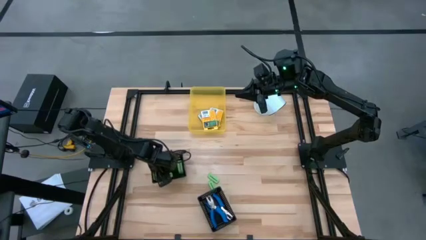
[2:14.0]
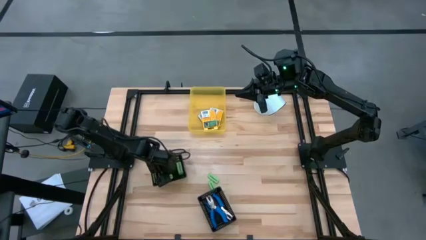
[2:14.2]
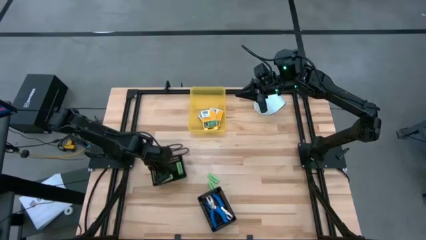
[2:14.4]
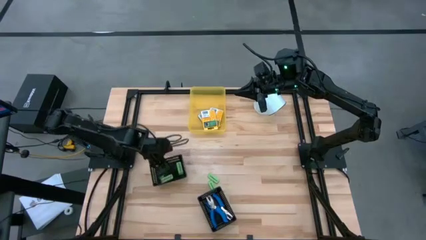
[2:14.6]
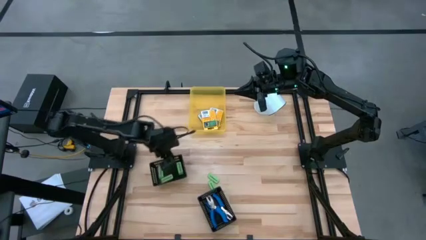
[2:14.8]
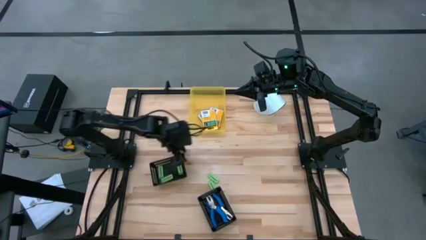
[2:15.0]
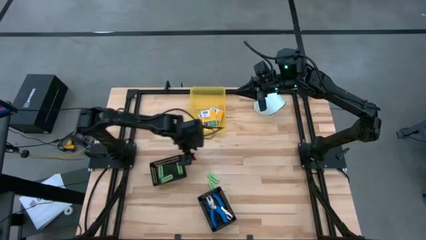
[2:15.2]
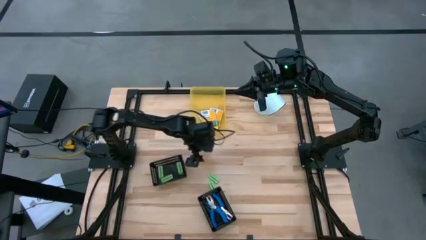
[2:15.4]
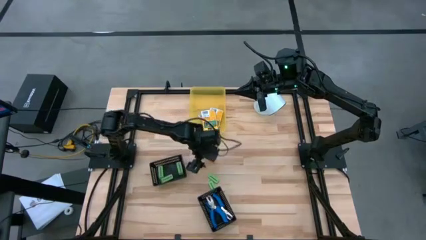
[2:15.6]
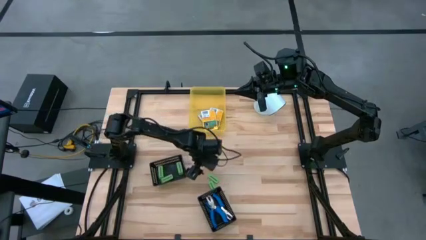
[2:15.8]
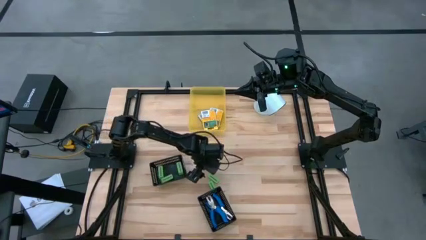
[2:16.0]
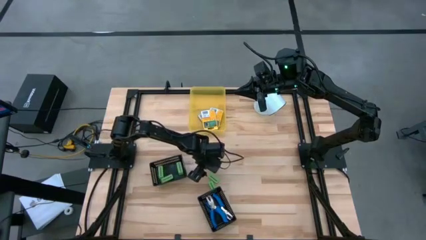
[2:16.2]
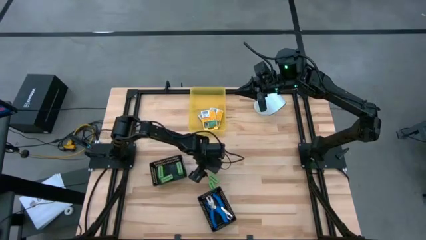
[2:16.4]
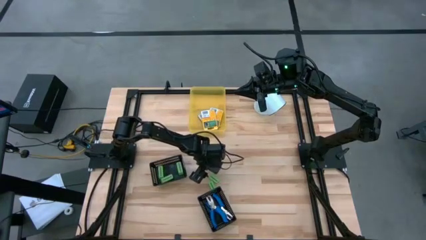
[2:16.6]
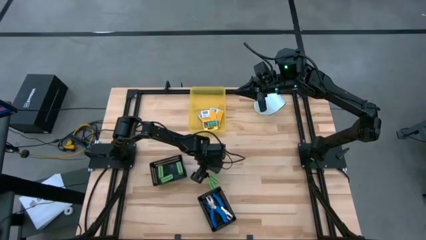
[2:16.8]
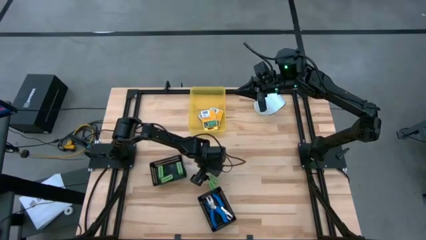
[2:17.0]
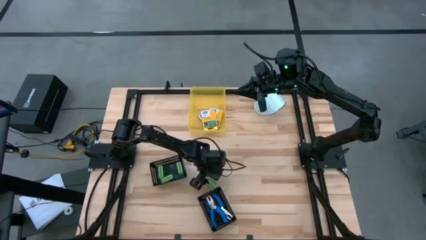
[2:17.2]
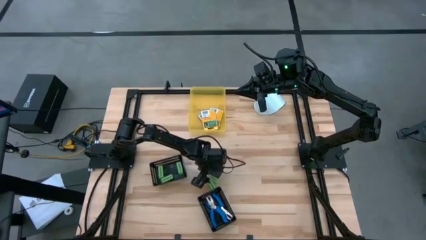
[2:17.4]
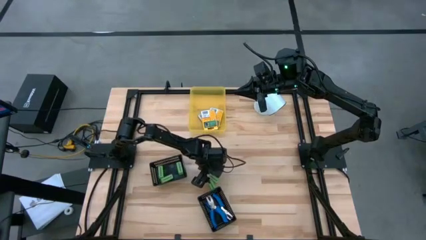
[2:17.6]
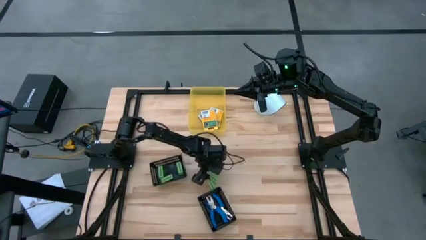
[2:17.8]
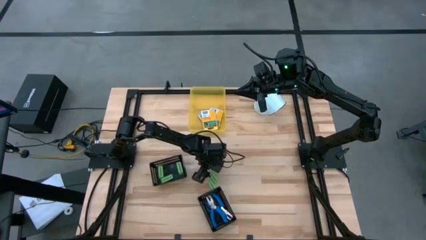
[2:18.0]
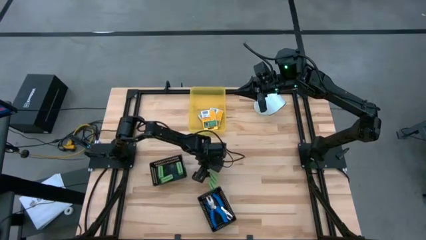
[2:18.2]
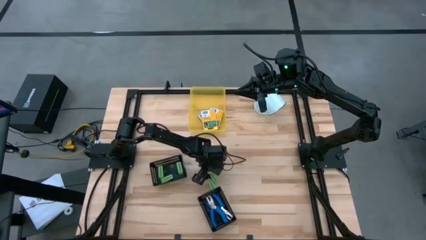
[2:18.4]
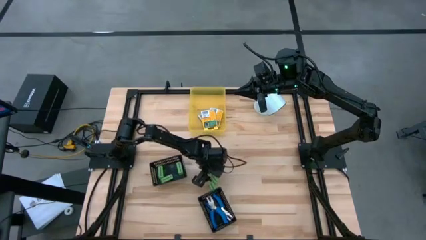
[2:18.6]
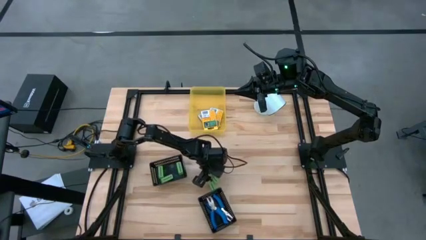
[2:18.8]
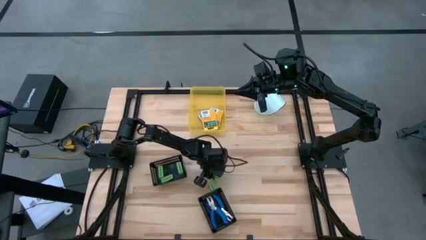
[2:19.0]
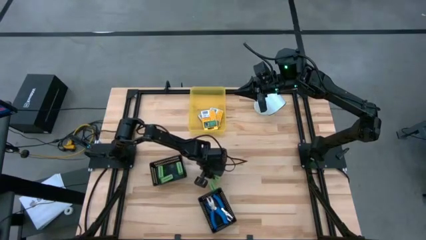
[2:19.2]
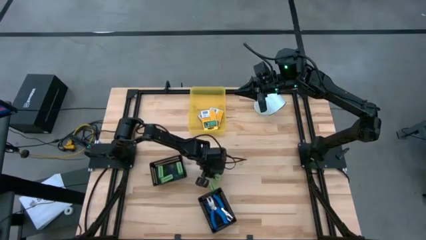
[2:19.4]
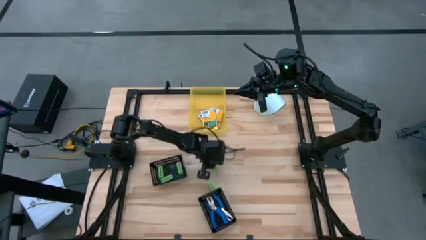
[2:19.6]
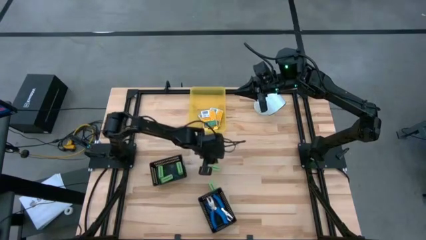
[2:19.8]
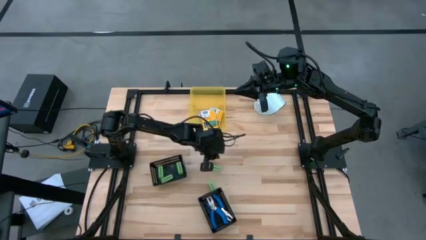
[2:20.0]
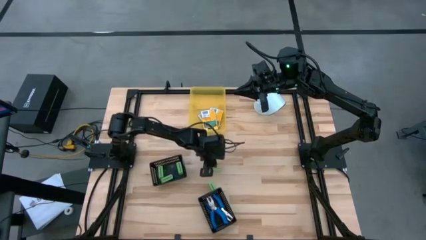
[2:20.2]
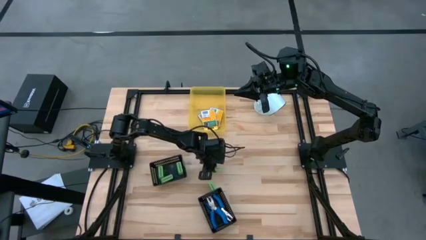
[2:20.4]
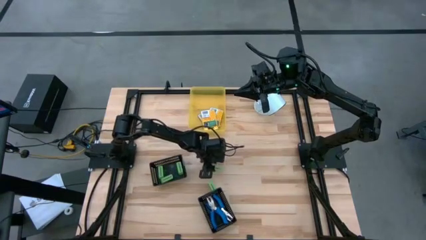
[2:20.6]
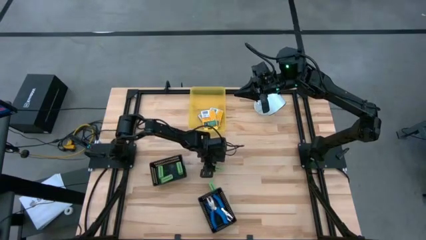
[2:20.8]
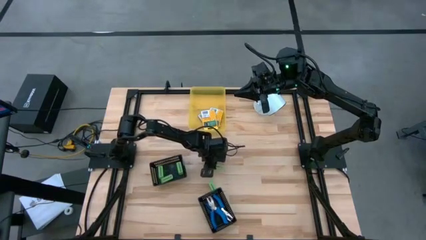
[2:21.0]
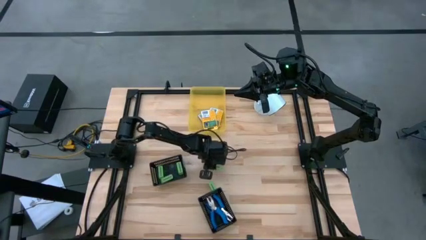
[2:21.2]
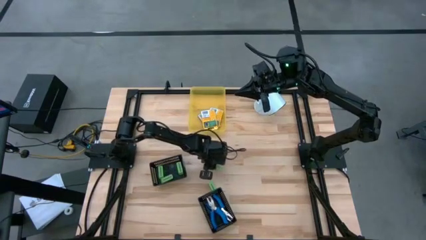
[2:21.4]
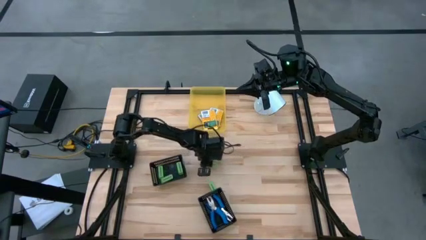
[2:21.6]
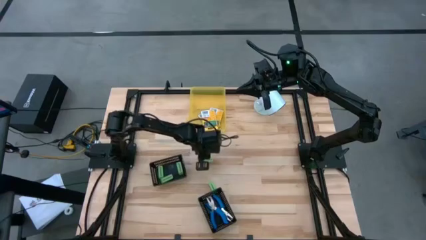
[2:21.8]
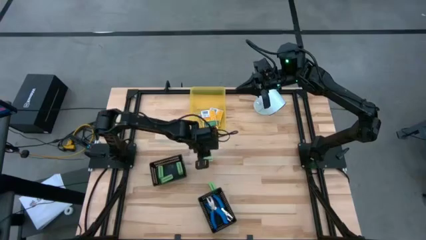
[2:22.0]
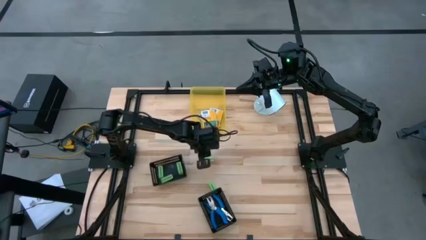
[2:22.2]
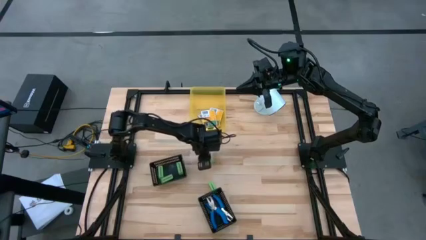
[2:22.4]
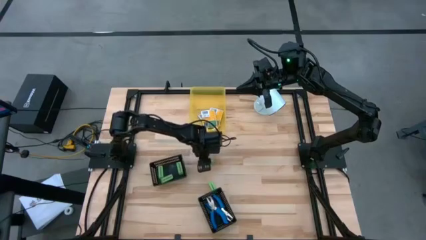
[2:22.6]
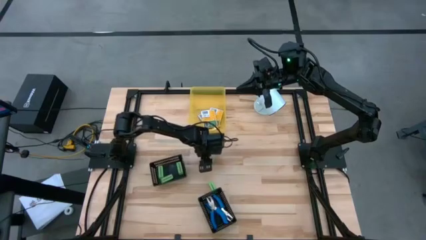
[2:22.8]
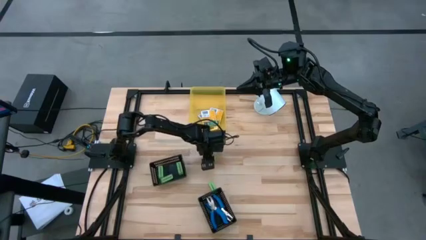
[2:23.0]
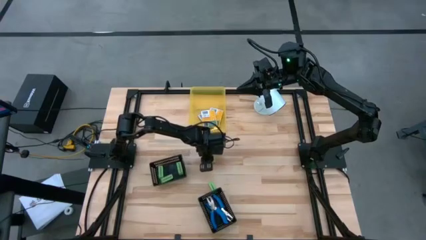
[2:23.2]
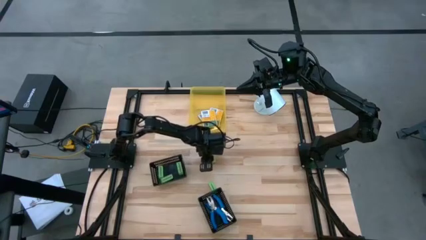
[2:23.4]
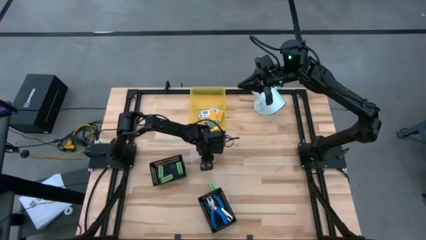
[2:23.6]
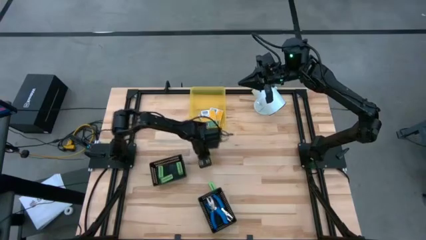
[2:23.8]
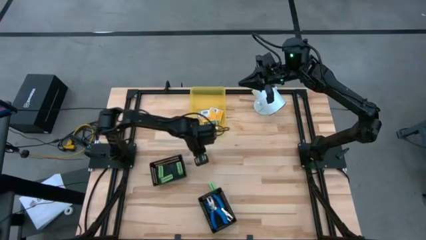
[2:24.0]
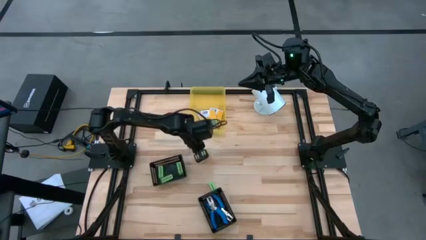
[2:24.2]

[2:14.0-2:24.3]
Task: Pick & Place School Supplies
Put the green eraser into the left black bin

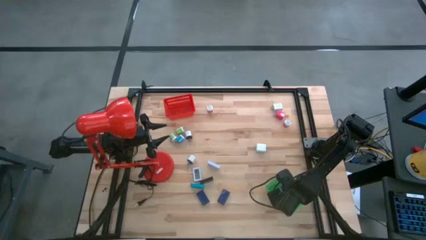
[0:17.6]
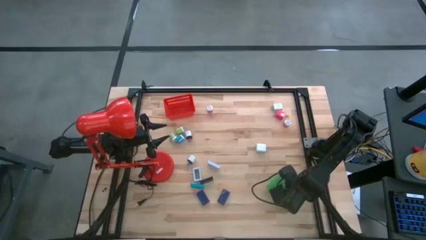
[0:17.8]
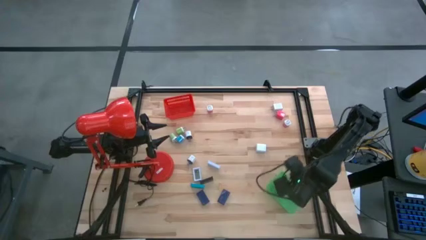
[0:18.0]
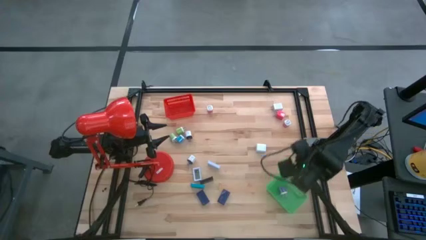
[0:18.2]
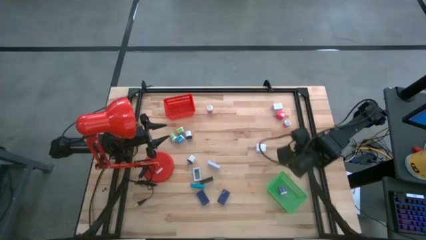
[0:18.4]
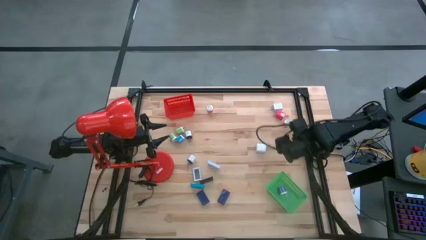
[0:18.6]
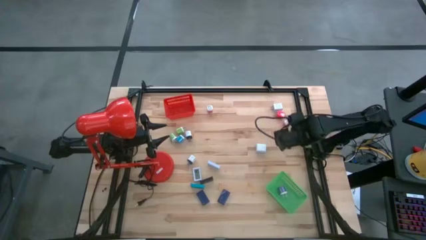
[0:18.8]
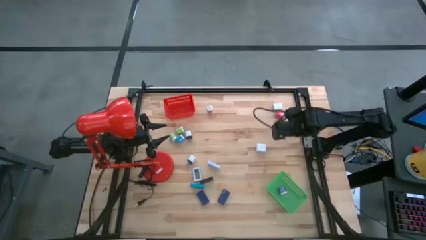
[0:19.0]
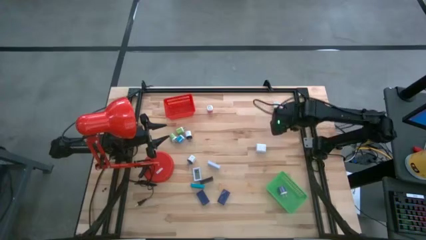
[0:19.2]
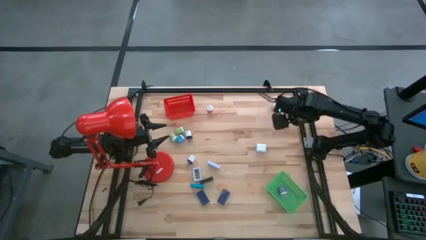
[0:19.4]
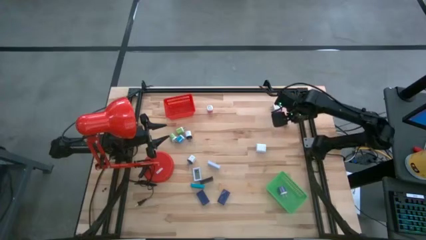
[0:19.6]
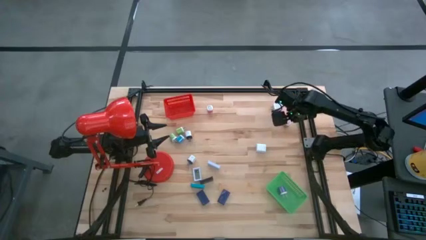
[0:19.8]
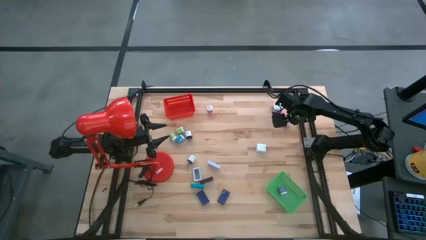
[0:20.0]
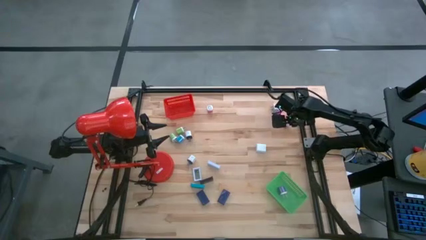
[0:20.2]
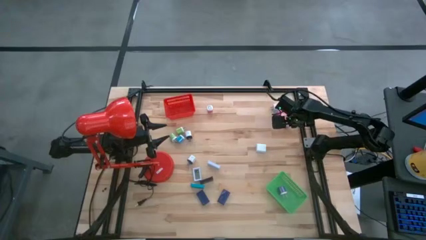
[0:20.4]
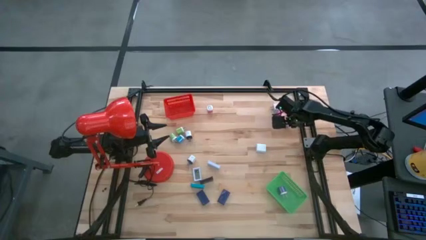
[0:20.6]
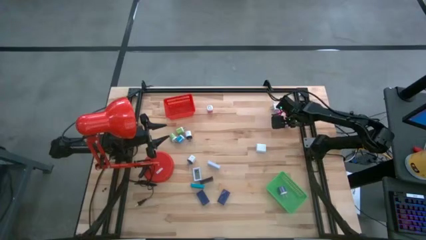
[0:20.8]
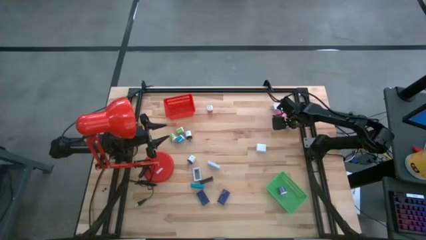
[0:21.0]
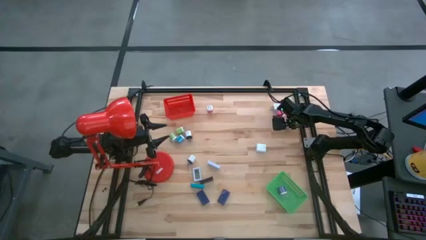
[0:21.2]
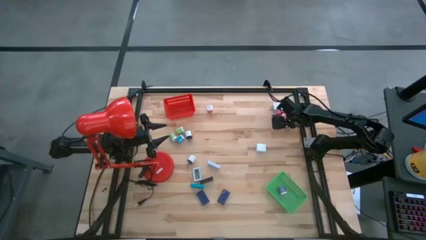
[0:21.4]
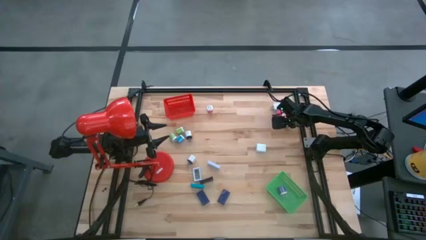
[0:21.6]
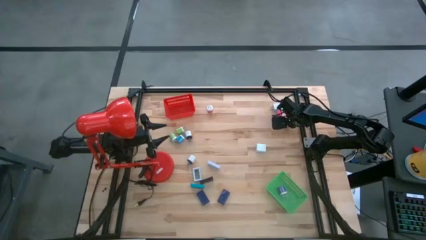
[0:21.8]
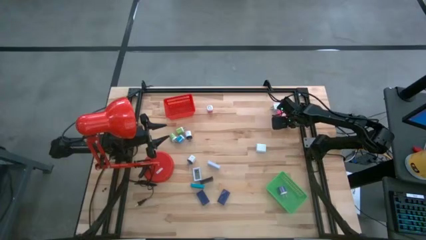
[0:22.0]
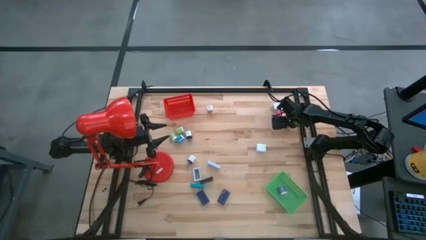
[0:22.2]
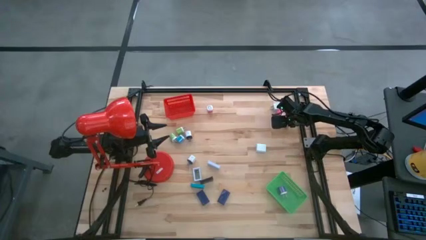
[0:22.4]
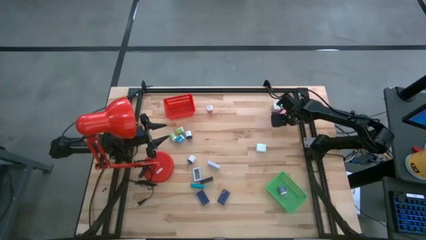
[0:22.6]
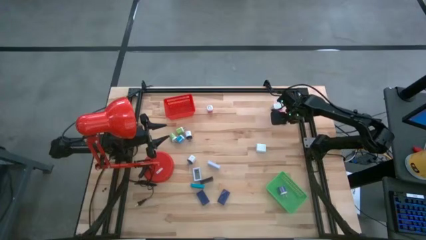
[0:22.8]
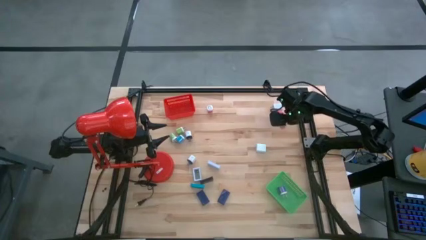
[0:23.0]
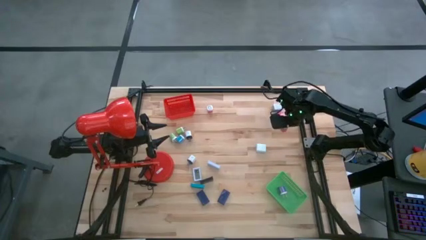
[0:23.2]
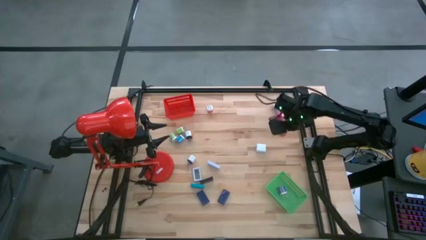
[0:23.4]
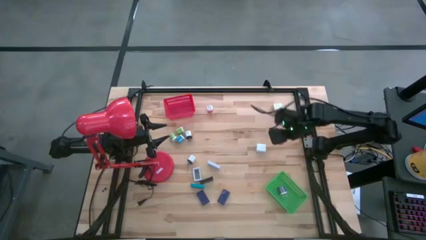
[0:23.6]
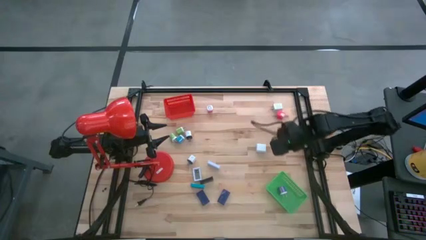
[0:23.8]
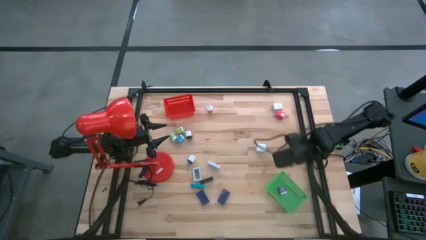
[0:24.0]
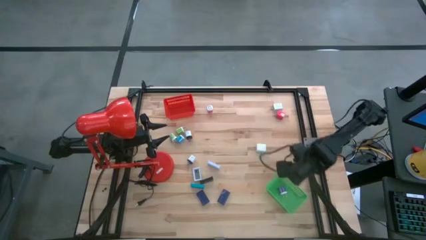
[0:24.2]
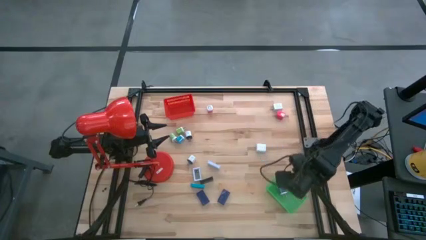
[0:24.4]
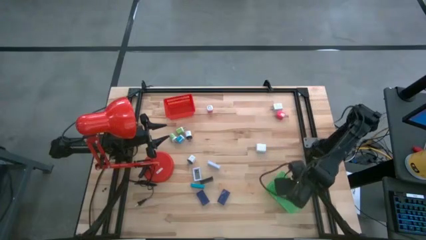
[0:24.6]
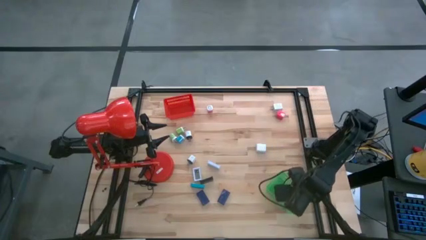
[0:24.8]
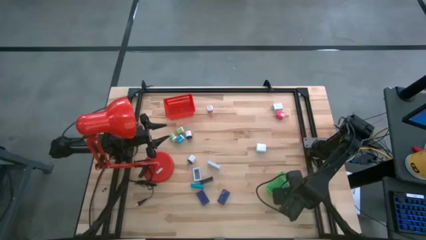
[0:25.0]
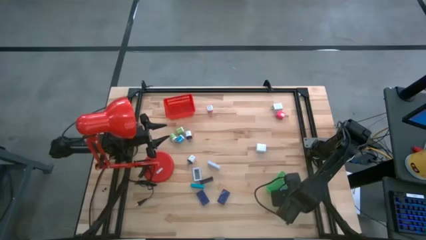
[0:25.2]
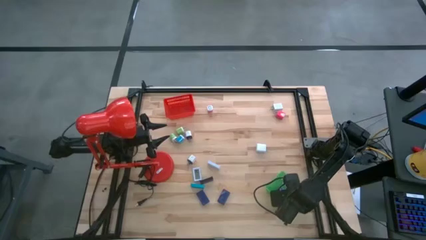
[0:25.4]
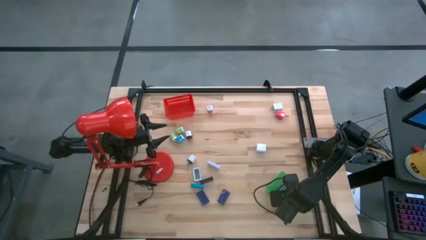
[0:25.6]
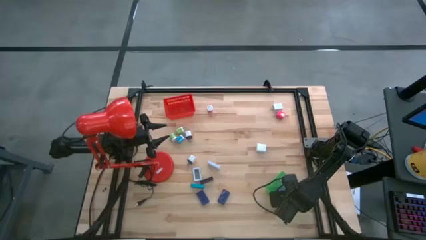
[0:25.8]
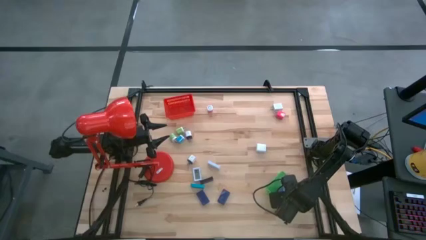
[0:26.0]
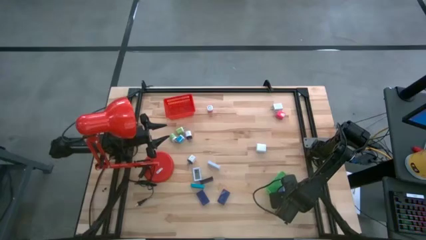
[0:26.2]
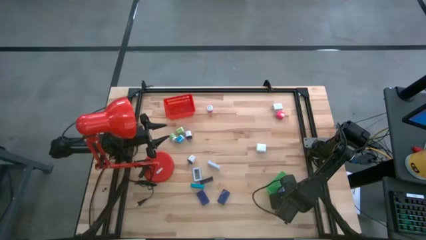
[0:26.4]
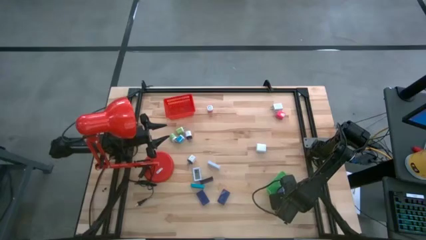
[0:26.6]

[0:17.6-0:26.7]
Task: Pick & Place Office items
Put the right pink white charger adapter into the green bin
